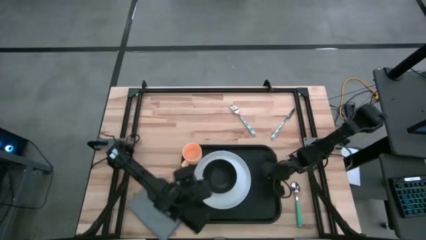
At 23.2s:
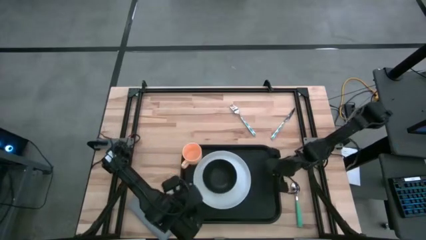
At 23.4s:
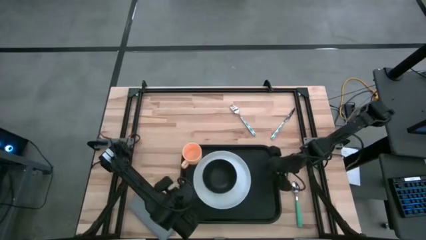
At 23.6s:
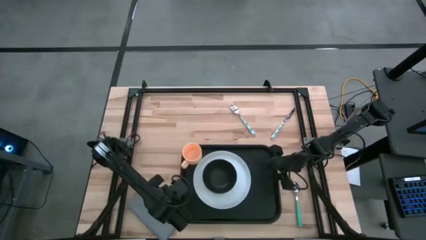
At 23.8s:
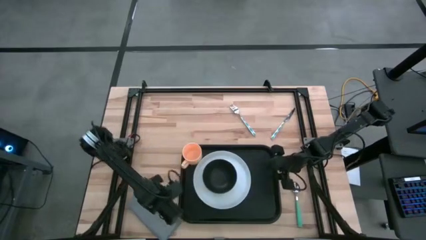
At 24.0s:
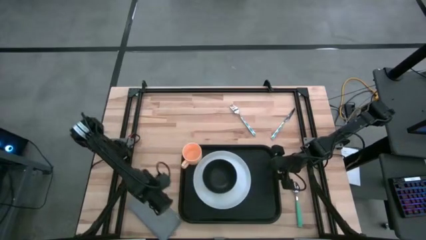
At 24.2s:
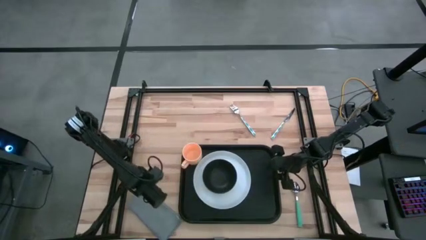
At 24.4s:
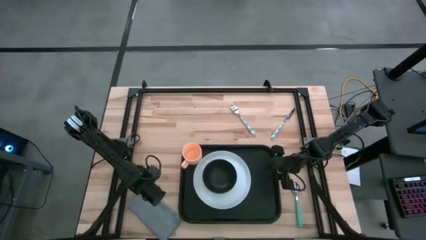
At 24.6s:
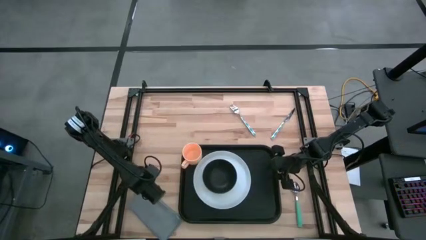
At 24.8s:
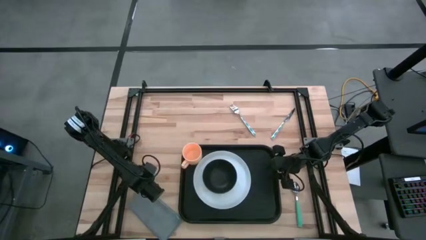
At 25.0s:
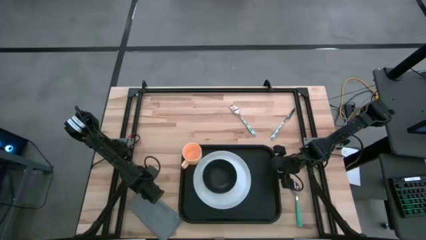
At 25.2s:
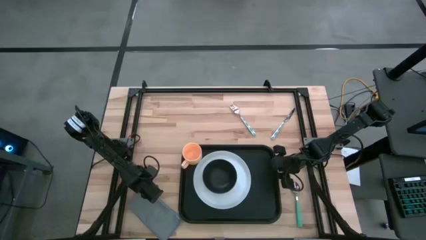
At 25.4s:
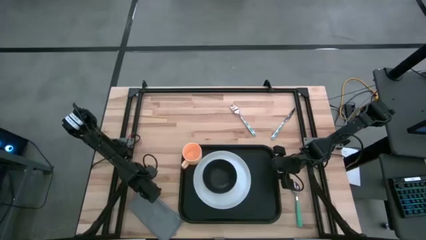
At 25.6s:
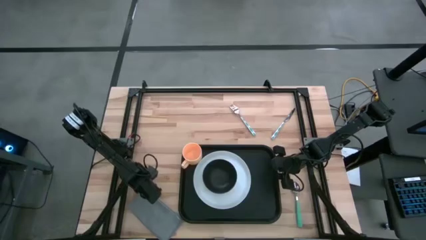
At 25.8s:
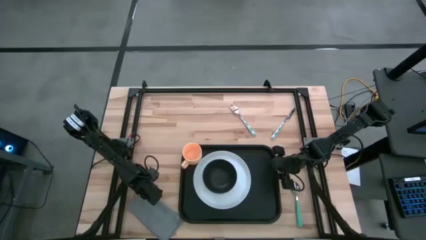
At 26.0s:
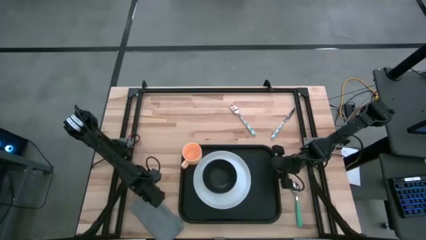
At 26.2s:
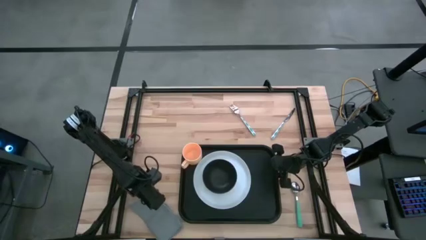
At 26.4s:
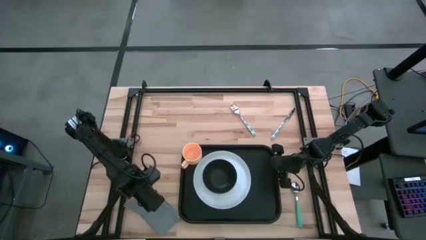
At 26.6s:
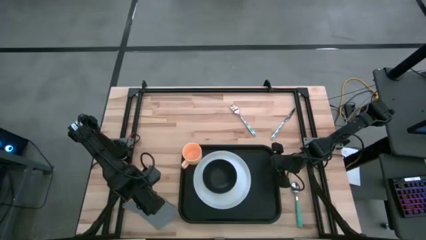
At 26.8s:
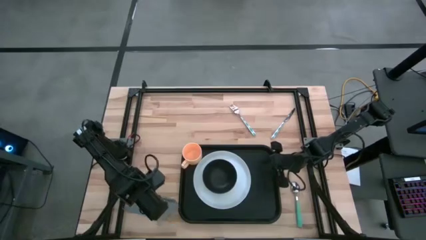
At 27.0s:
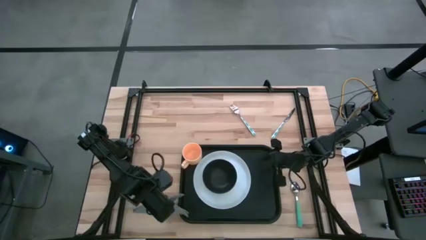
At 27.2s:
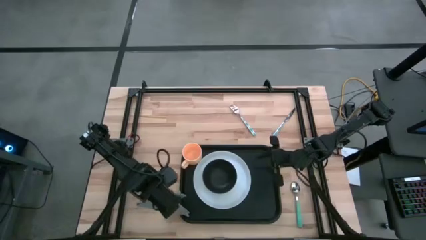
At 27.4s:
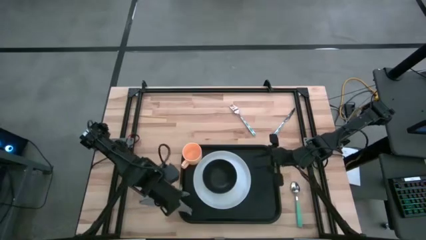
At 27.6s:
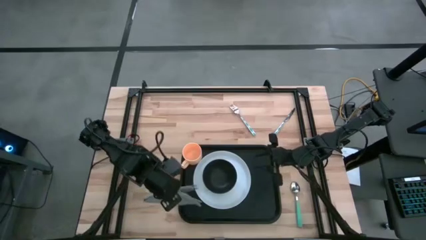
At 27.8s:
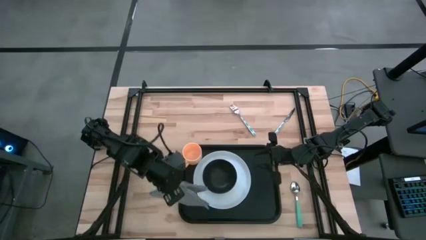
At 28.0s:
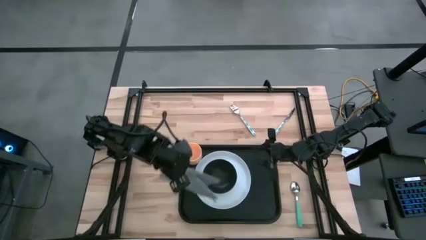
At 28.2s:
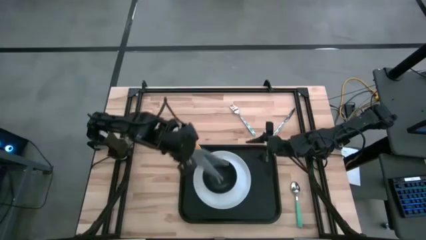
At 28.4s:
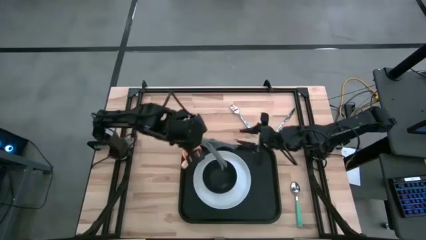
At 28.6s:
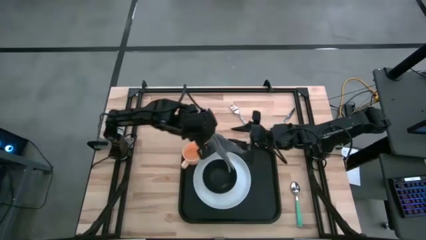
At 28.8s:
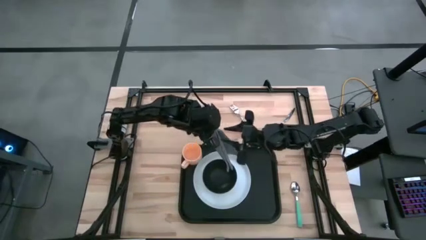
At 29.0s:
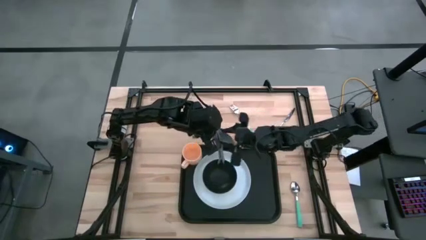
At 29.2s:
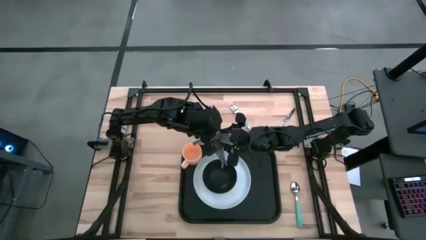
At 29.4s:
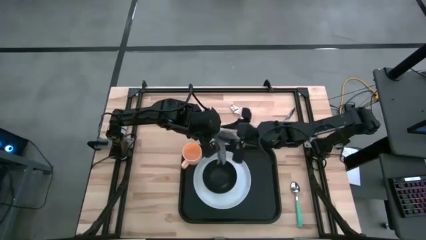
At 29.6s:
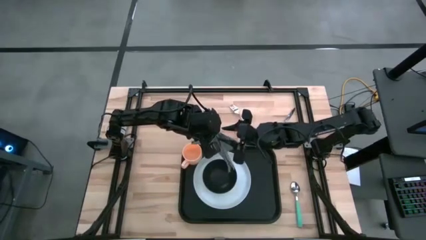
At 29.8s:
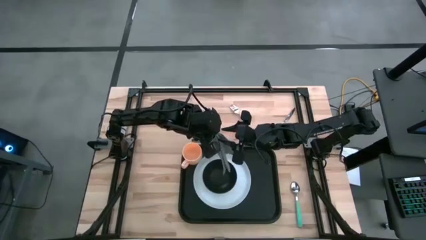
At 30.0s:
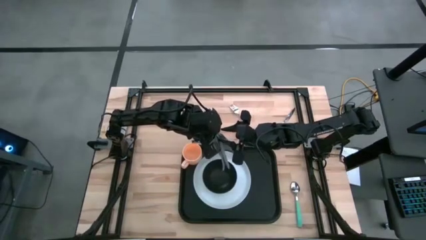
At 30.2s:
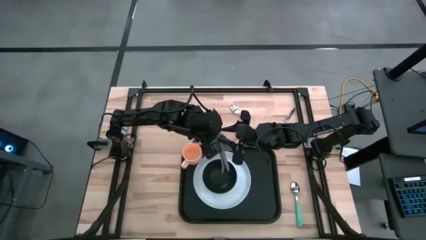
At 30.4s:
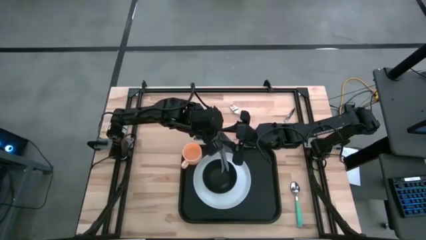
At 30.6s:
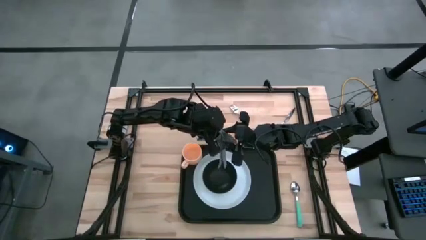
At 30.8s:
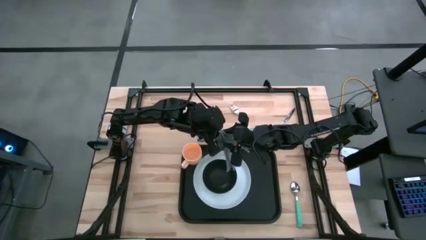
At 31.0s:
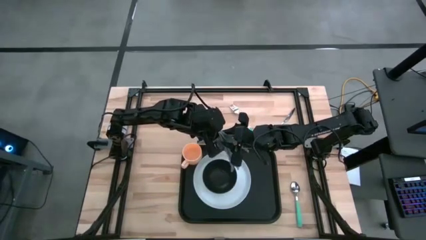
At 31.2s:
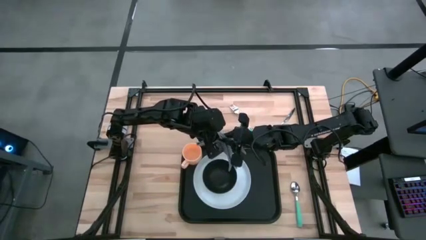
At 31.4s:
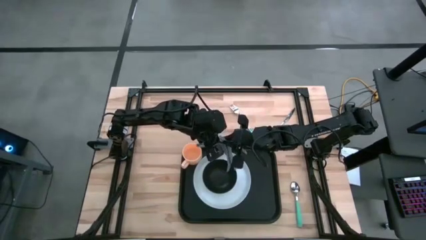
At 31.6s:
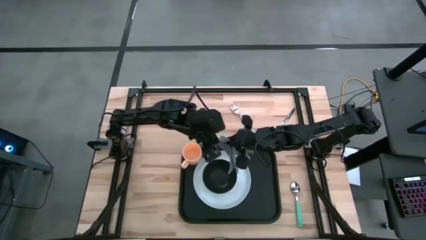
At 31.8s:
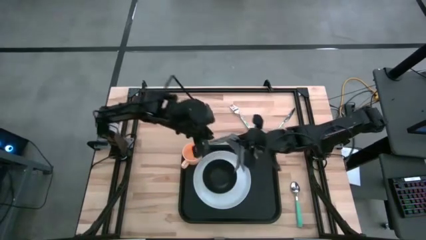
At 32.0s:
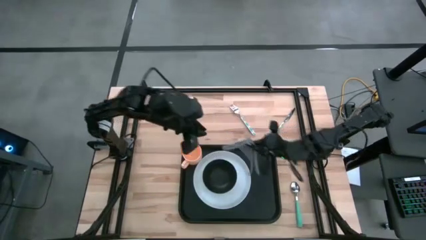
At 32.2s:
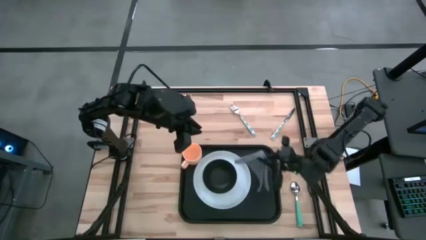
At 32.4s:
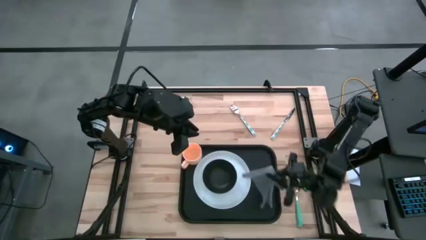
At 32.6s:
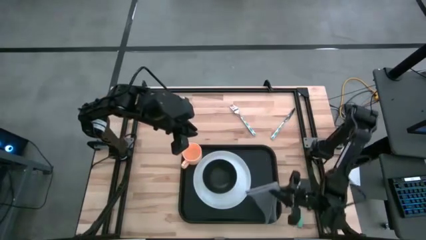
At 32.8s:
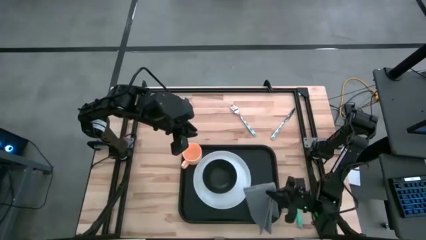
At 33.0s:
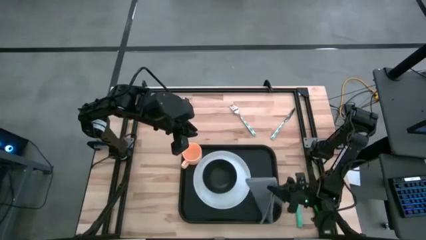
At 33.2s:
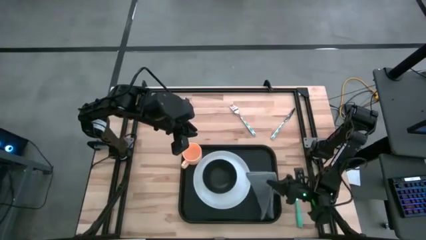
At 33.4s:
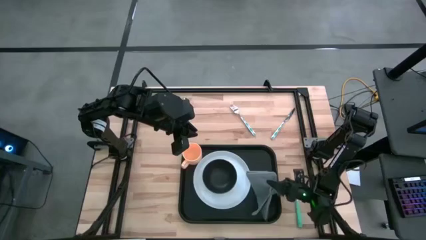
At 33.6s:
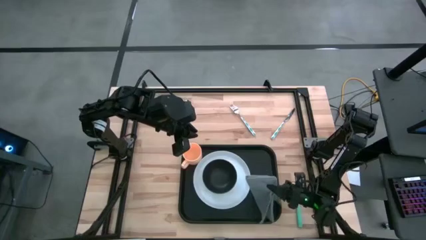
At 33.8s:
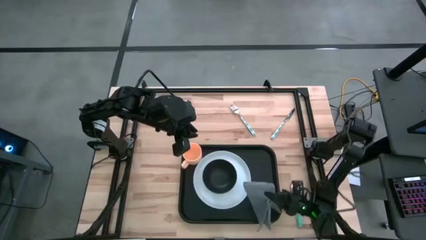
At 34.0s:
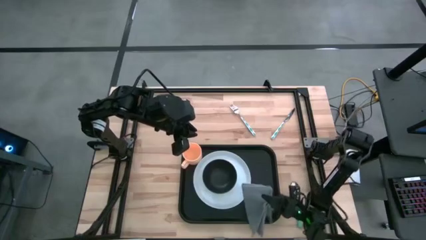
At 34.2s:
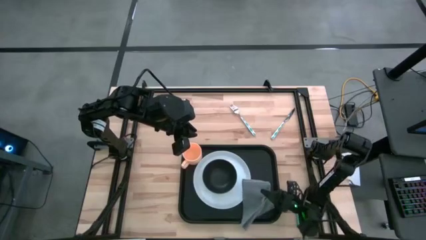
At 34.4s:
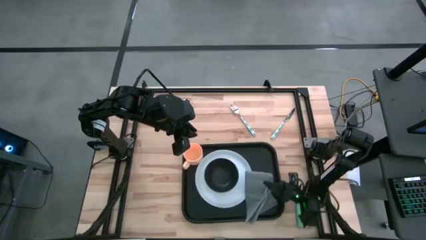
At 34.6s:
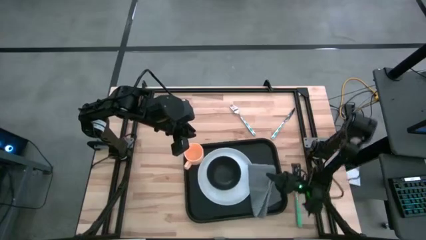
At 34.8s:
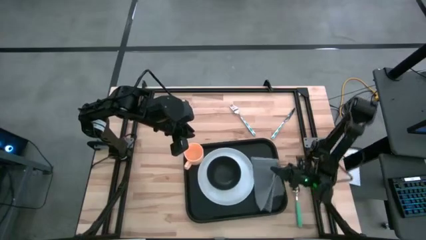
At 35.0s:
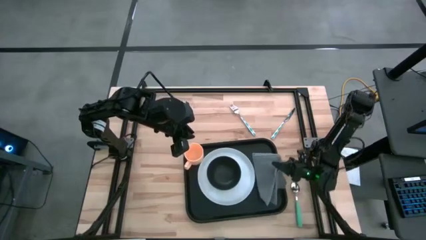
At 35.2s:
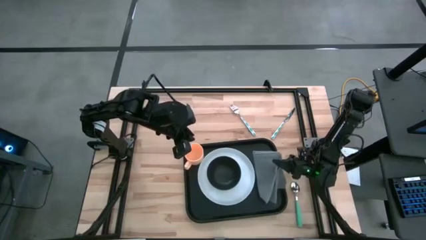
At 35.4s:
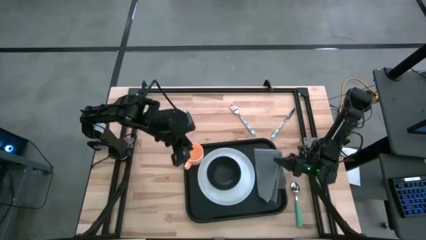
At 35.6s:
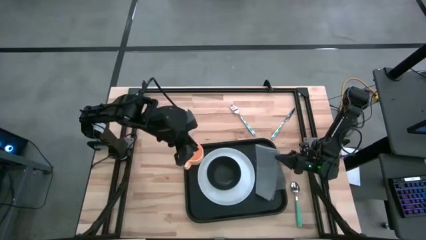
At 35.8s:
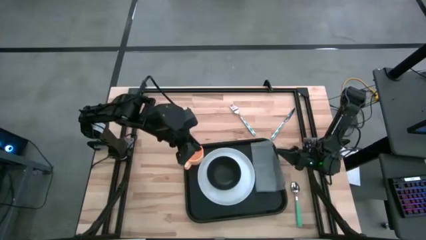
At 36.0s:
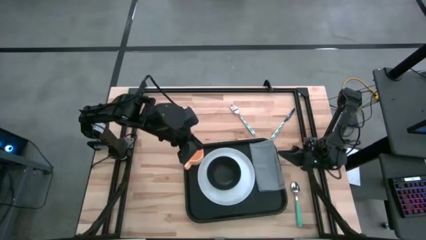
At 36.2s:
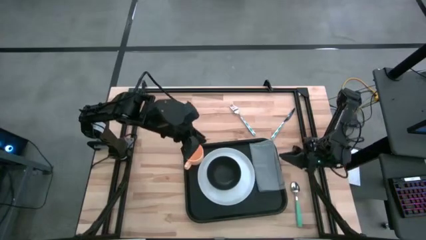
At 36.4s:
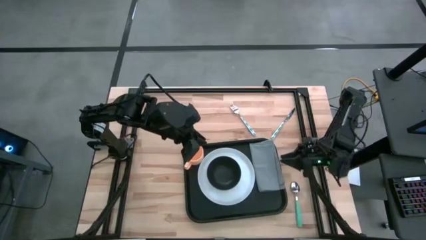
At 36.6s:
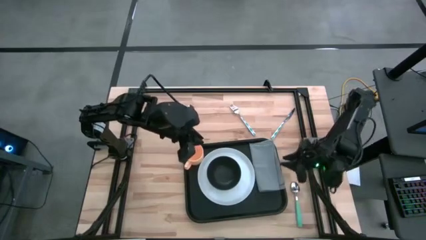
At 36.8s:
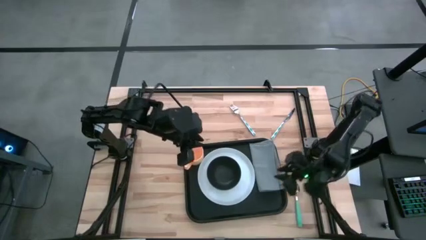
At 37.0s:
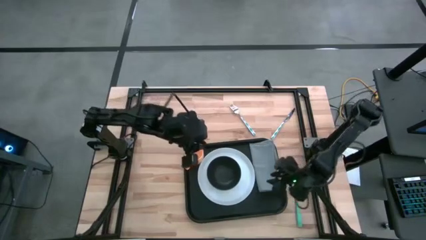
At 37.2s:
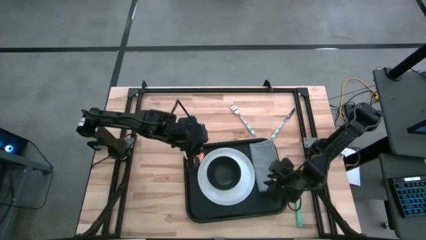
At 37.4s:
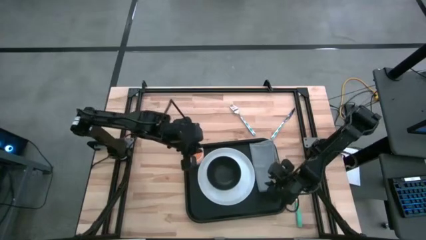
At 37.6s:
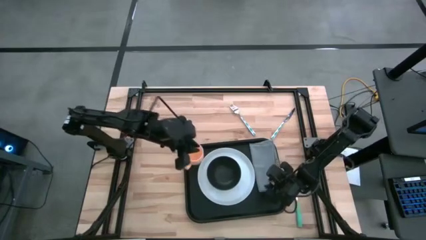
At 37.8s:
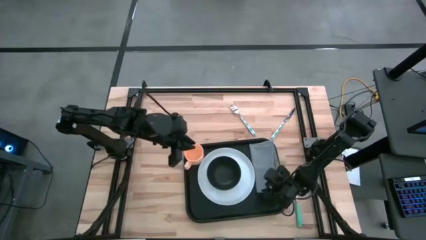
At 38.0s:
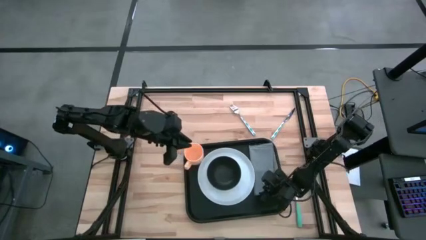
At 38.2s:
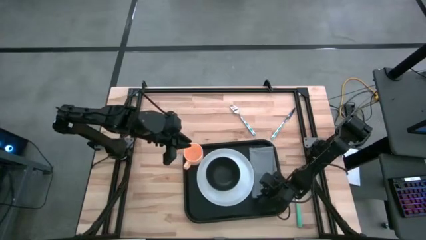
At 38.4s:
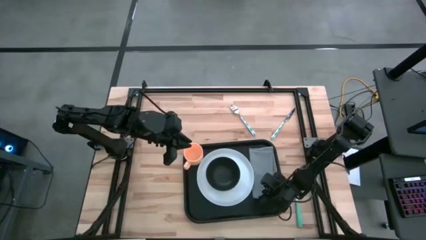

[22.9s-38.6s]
Task: Set up tray
Put the gray napkin to the right of the white plate on the black tray
